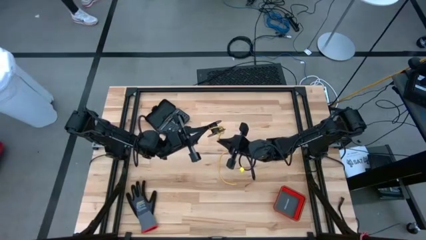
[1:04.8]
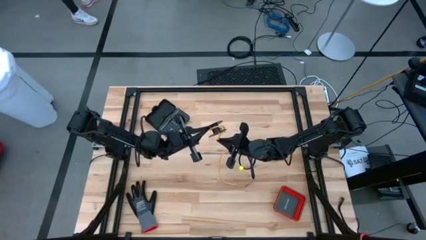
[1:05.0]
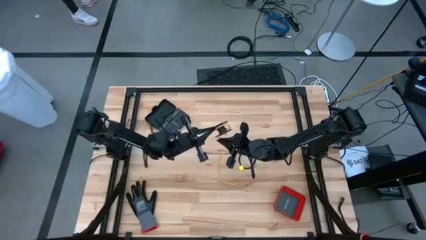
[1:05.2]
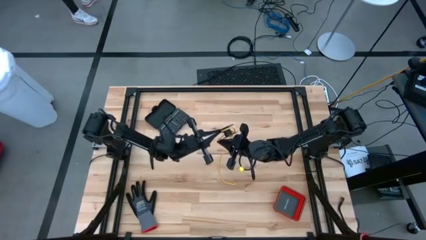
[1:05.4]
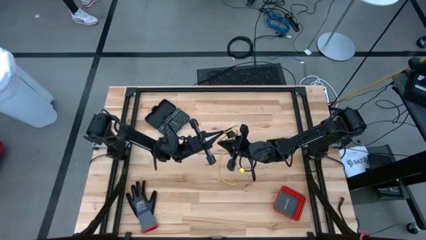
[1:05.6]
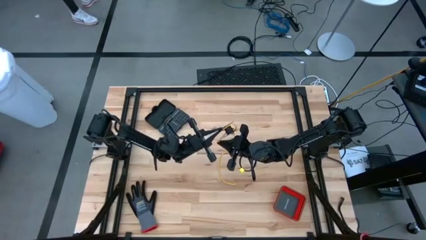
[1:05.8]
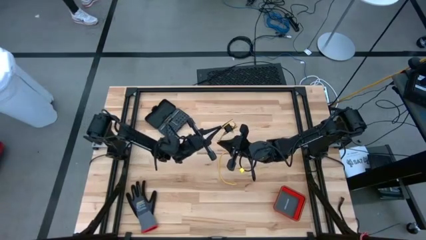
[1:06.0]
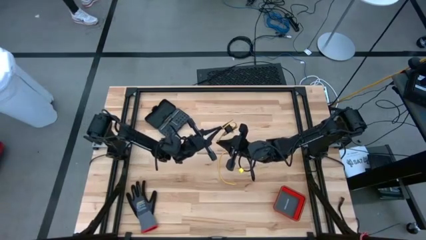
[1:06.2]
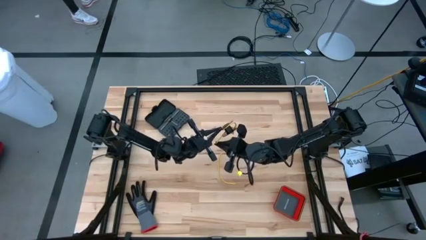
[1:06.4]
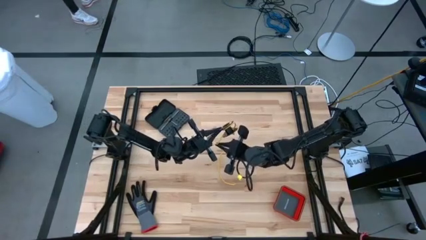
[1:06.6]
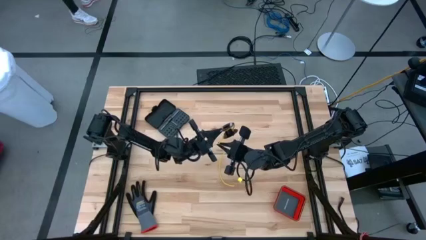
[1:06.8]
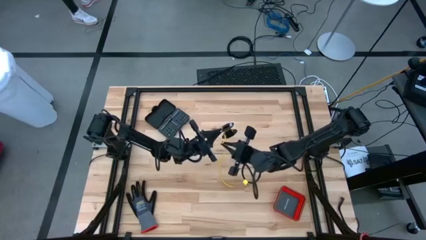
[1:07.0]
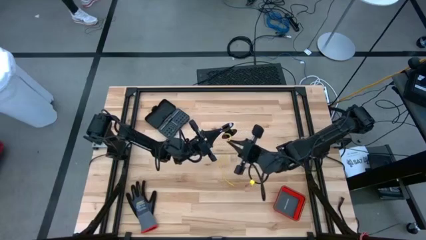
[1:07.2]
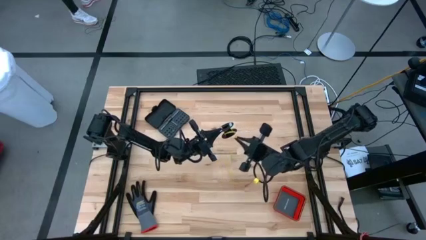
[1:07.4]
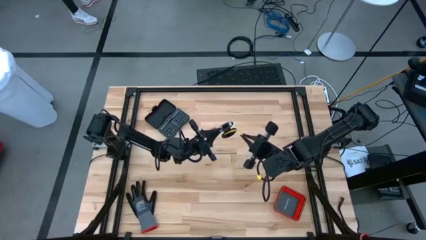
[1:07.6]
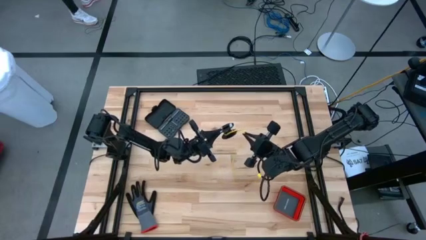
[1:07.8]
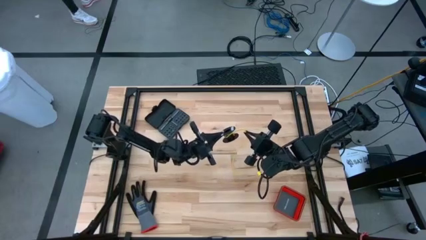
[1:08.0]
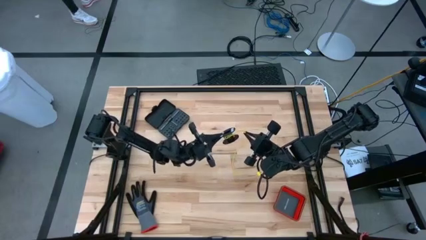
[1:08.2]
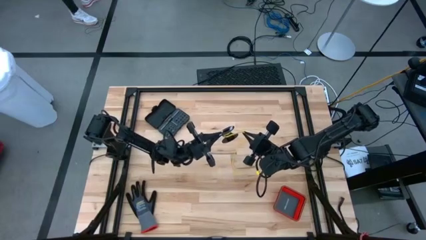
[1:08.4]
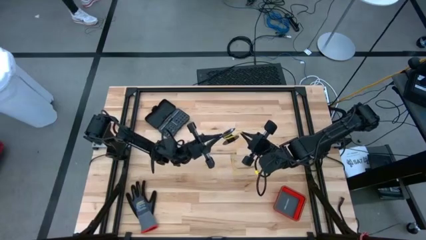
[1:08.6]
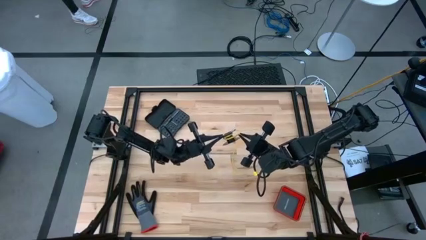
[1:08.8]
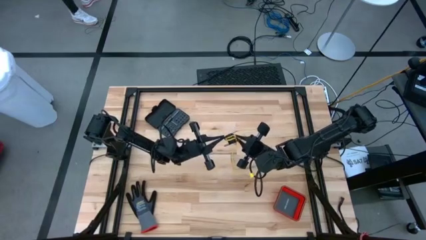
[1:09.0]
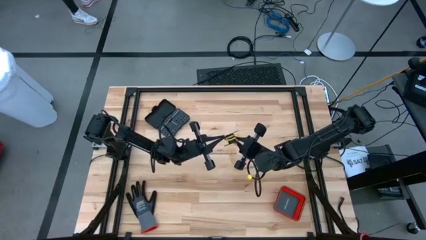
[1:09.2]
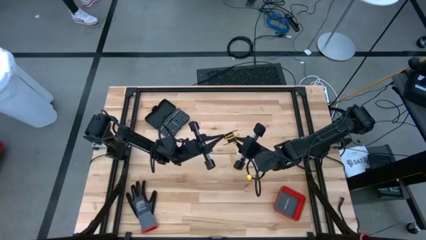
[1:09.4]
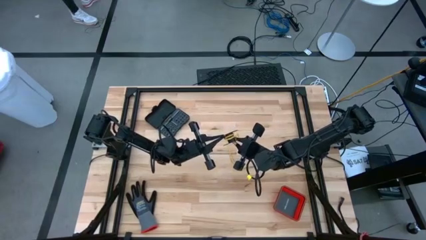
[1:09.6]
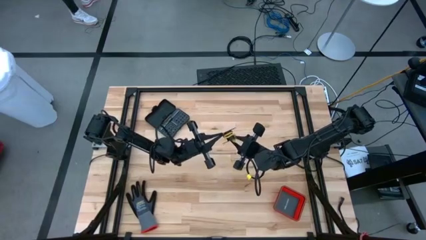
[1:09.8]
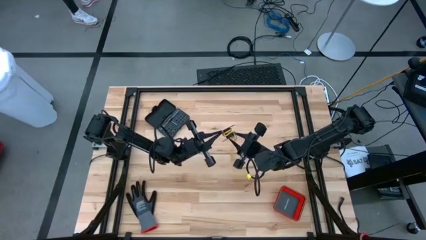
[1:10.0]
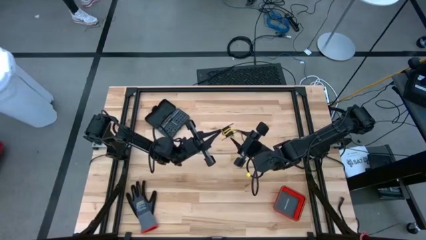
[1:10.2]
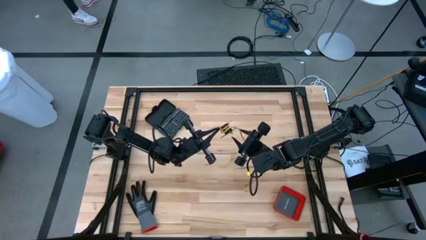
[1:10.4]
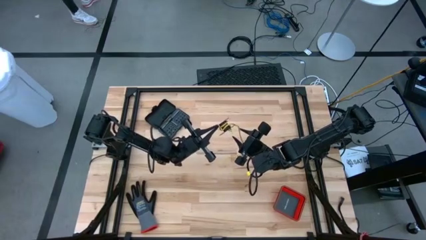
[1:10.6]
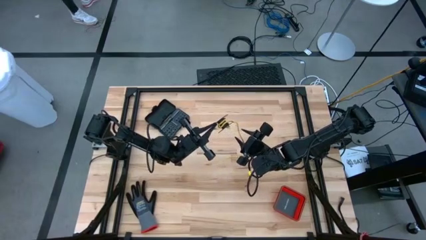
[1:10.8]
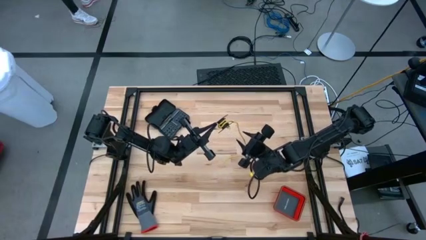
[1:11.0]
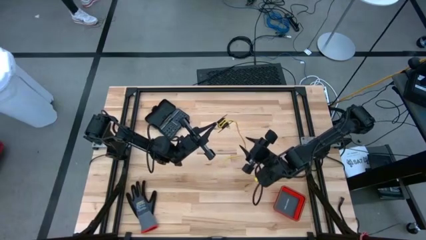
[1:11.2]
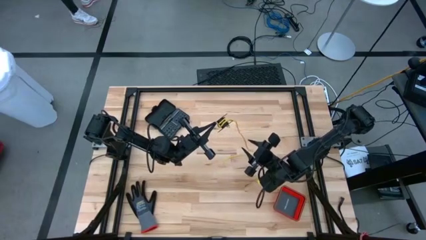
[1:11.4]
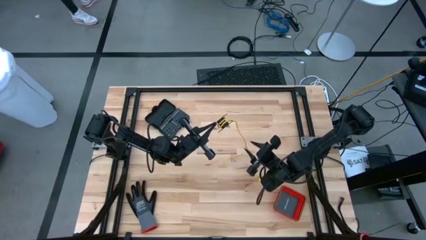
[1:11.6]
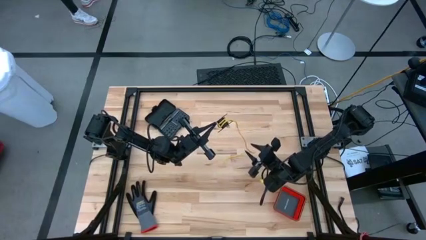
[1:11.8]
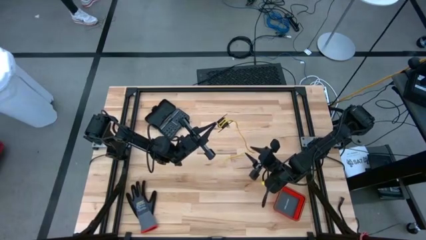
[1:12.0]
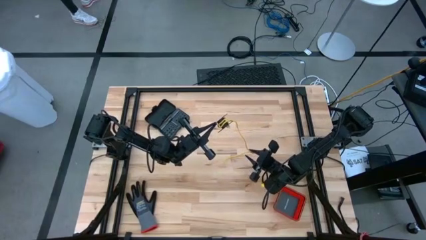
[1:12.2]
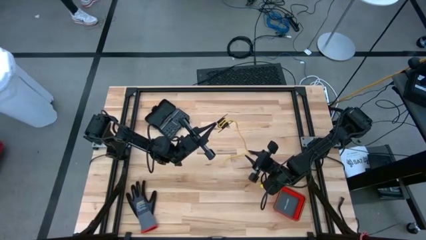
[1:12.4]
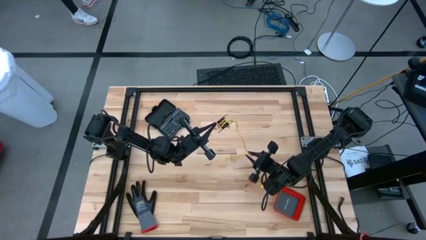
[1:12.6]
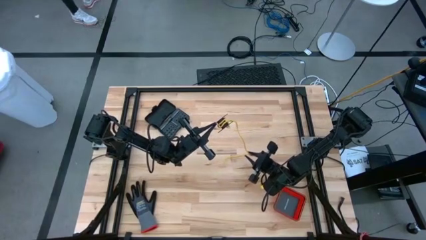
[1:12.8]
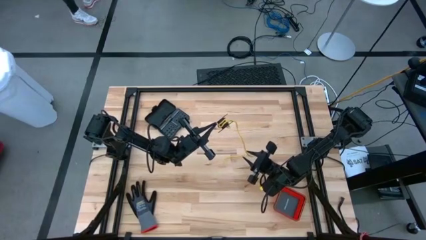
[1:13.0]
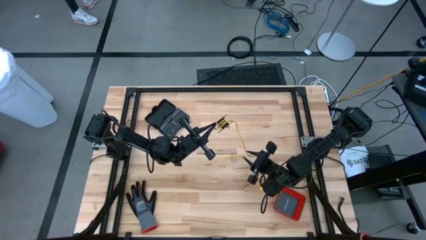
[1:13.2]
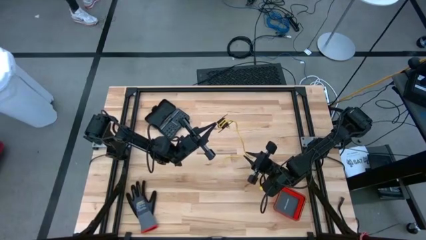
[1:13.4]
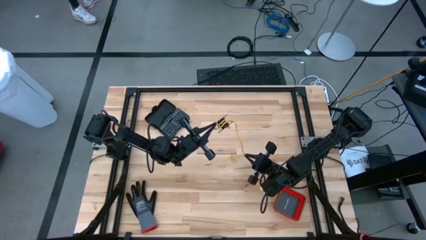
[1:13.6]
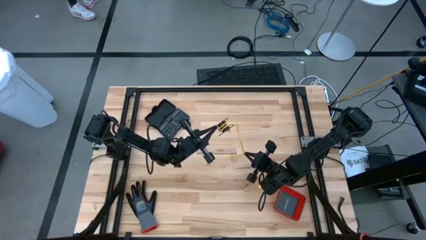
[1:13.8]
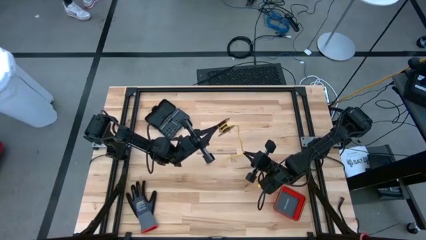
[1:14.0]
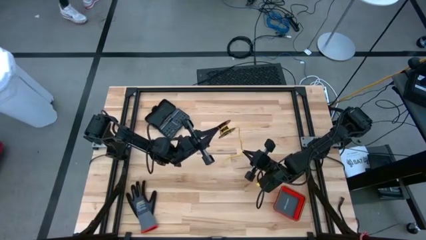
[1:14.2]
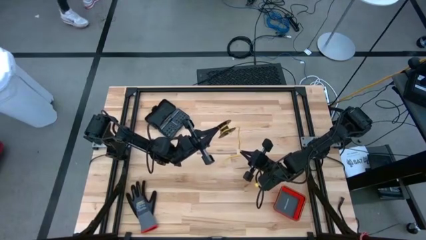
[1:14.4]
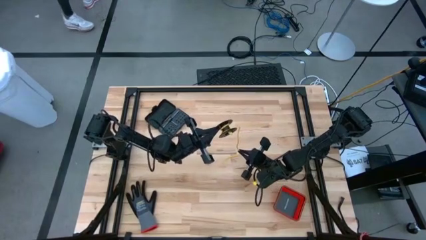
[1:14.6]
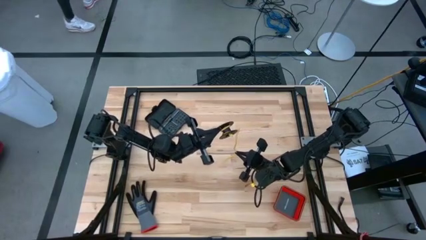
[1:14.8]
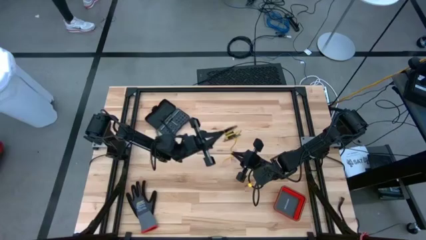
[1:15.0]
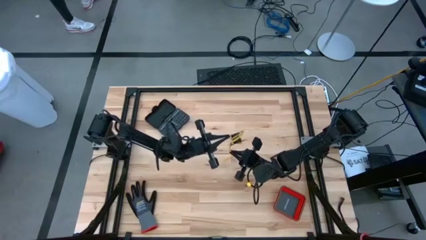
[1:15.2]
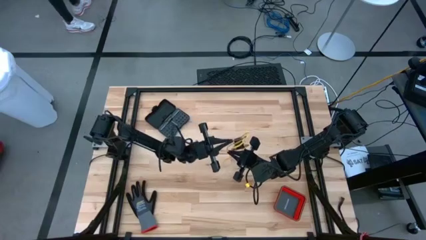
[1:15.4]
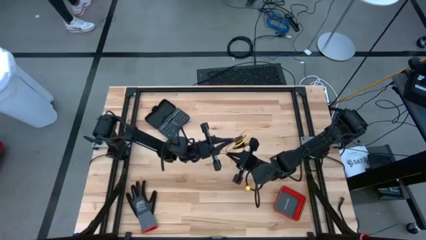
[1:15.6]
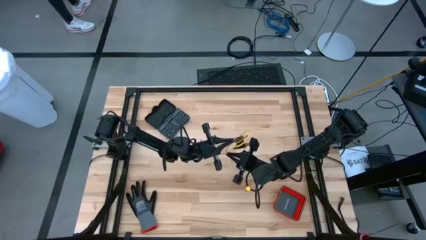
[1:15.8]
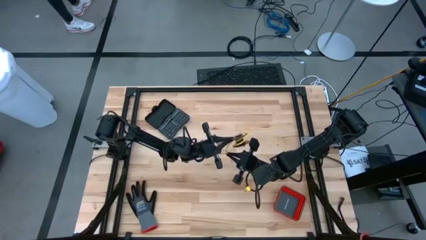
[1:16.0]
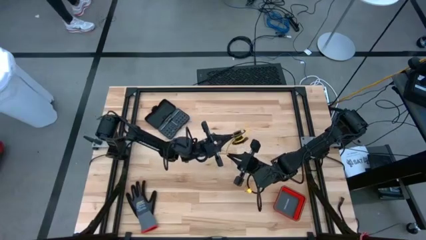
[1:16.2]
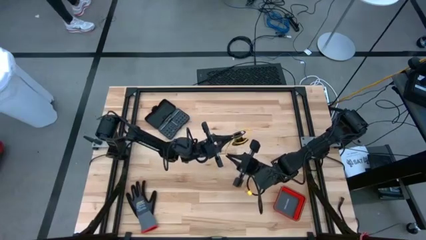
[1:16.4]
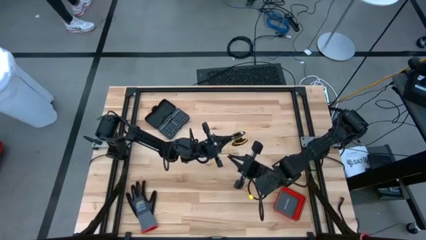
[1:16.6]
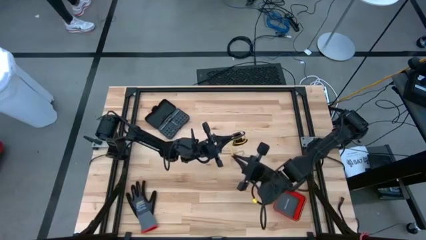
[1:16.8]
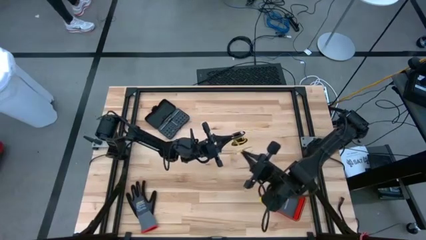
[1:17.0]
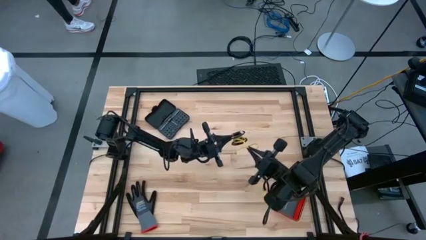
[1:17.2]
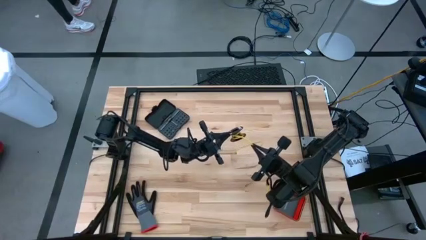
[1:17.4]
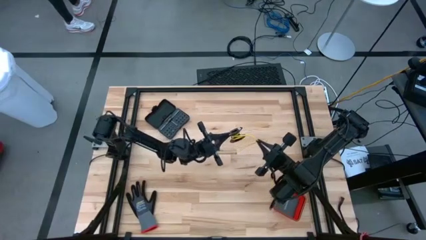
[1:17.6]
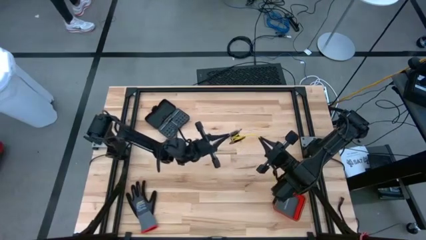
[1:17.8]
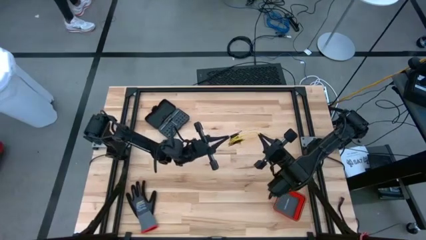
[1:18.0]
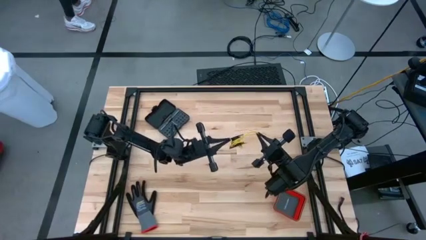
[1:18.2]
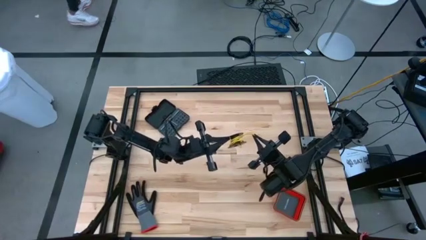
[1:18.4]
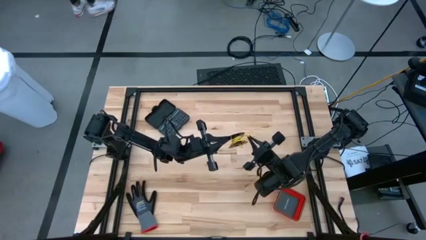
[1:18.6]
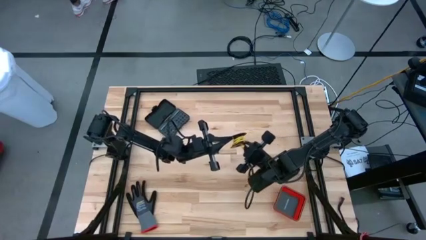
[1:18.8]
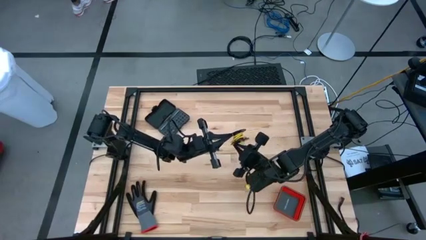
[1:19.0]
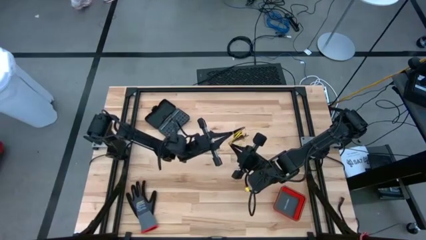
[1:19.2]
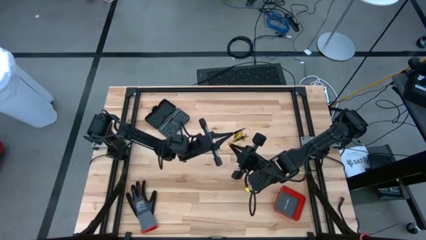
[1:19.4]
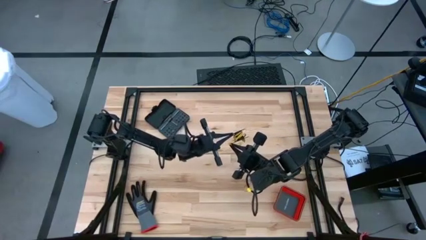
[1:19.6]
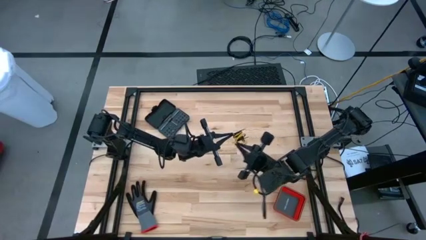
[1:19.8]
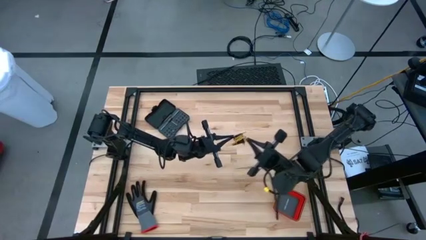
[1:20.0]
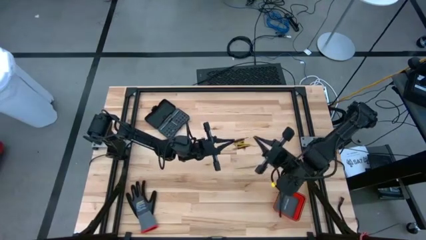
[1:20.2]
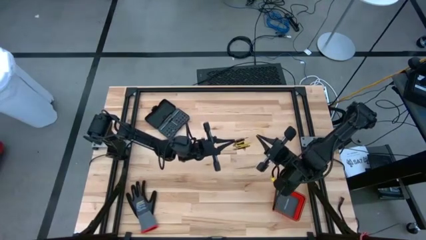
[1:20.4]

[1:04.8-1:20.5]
Task: Coil cords
Coil the yellow wire onto the spool
